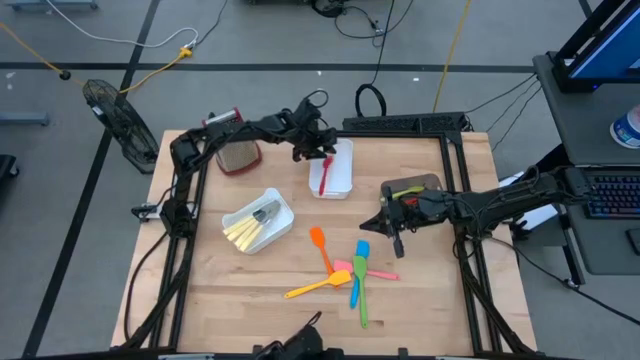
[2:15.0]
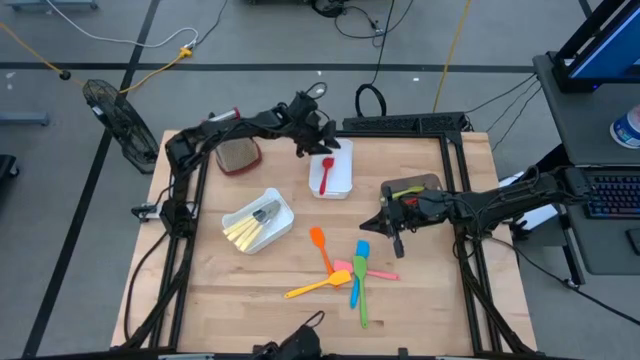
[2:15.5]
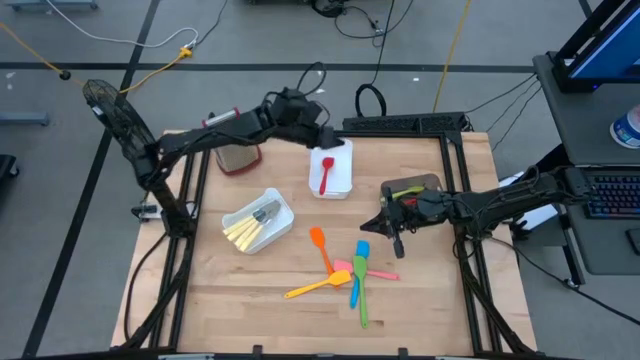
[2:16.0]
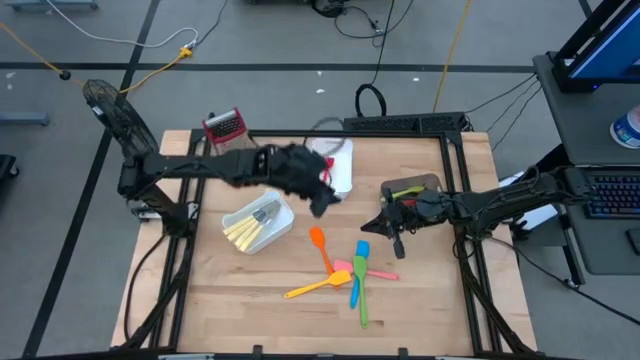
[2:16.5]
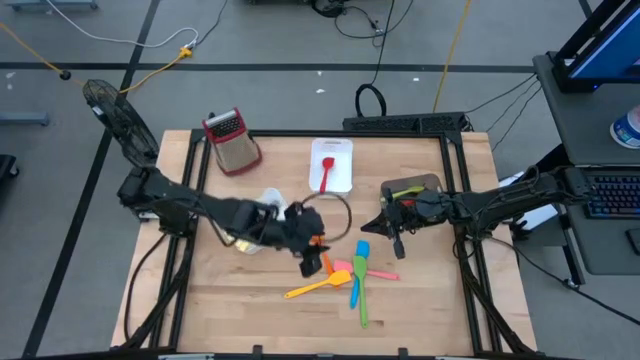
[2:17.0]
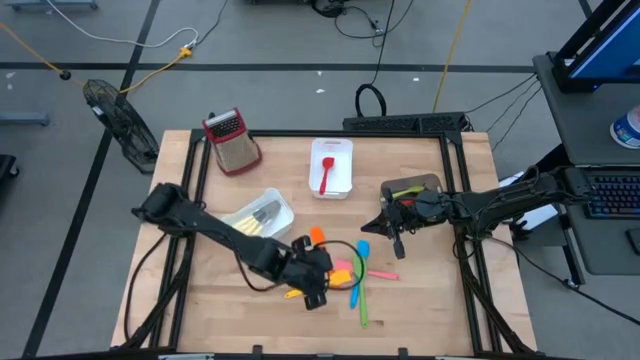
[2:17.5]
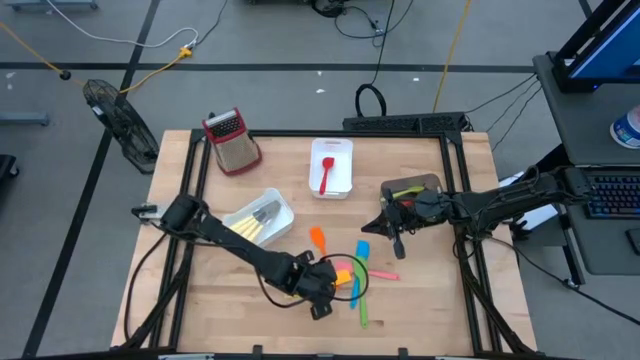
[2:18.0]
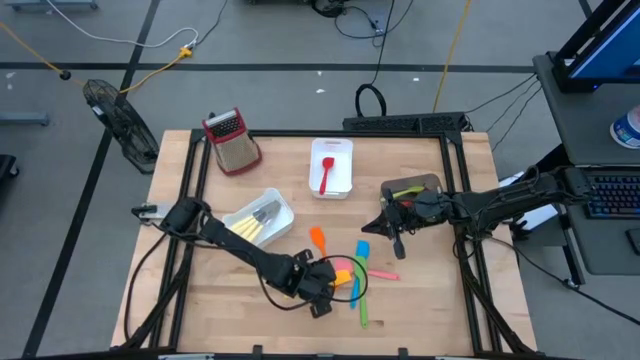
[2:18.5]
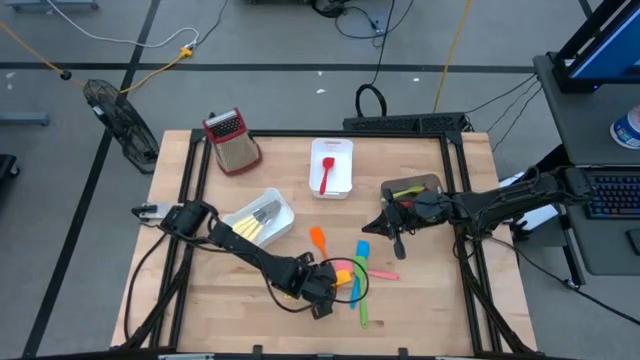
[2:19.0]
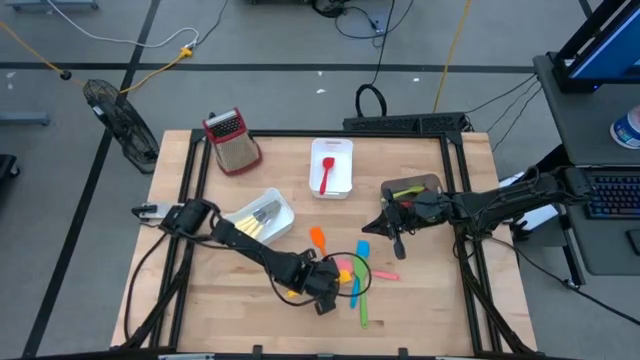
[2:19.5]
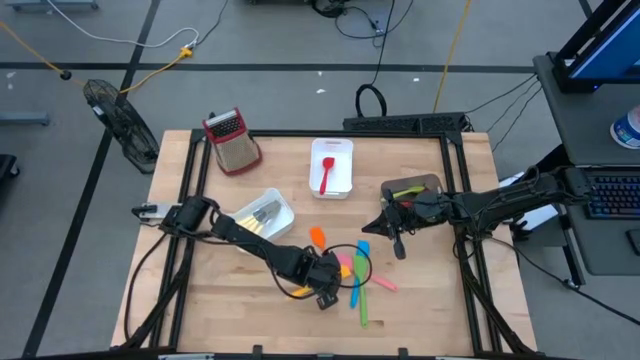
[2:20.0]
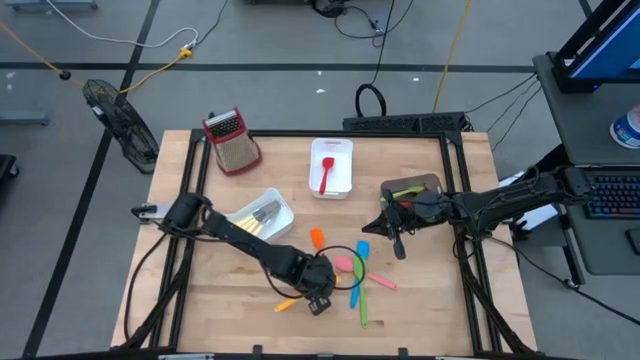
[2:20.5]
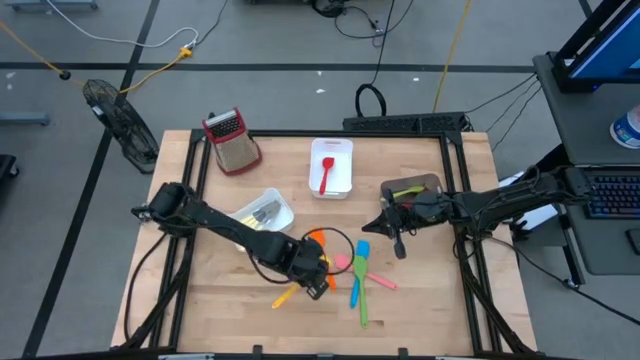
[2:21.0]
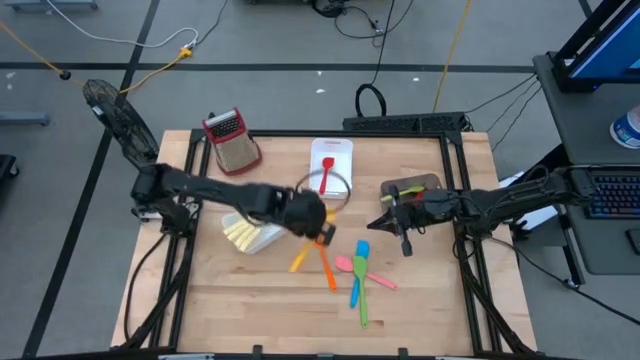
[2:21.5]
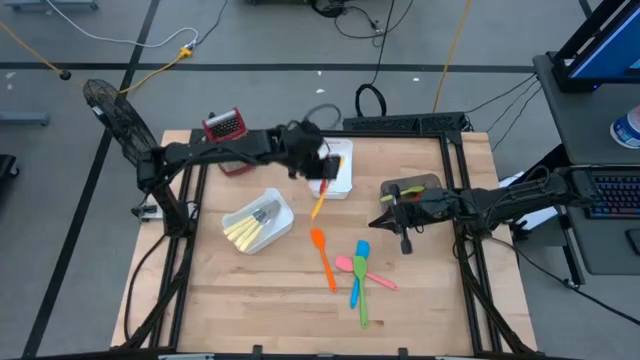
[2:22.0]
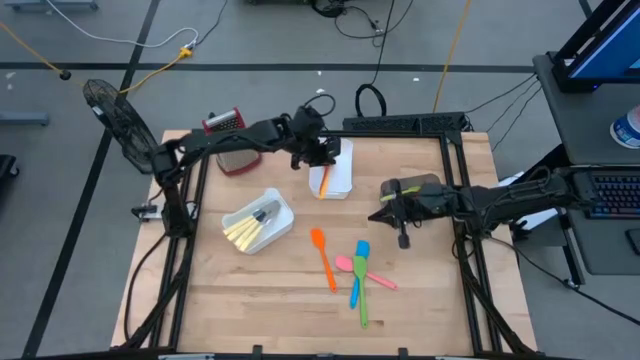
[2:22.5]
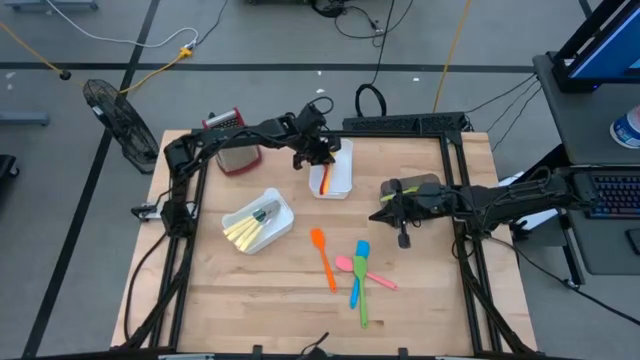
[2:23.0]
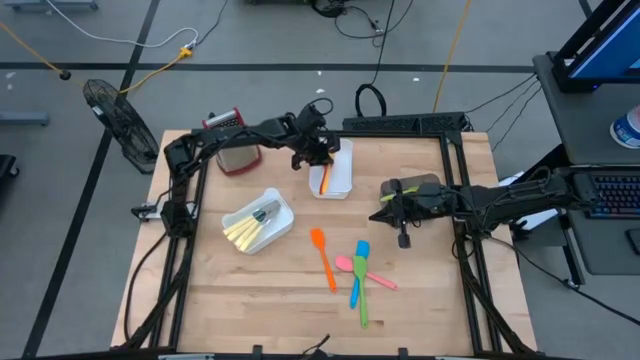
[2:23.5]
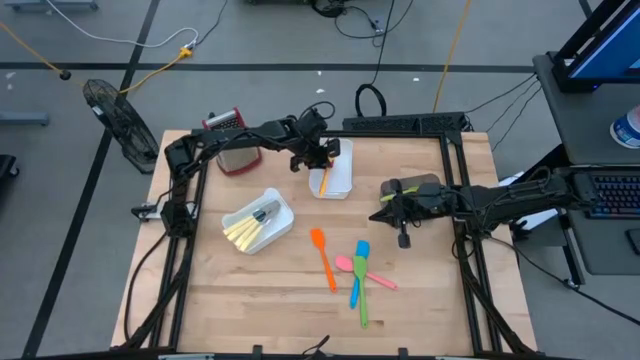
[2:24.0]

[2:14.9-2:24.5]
Task: Pick & Place Kitchen Items
Put the yellow spatula into the top white bin

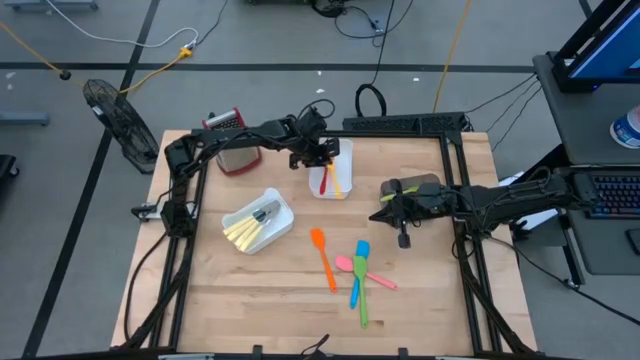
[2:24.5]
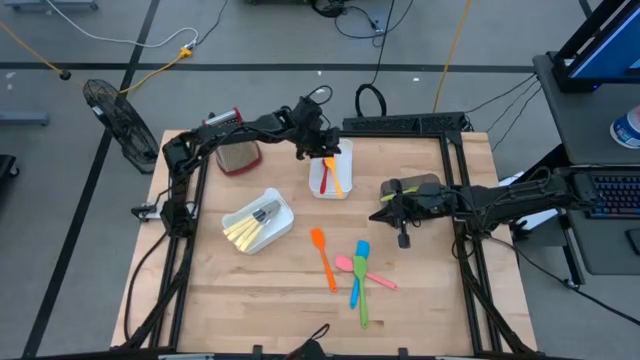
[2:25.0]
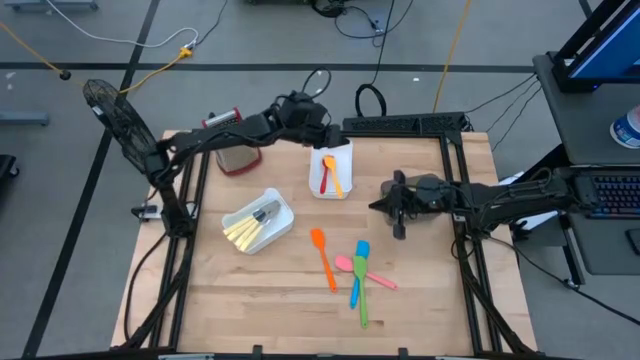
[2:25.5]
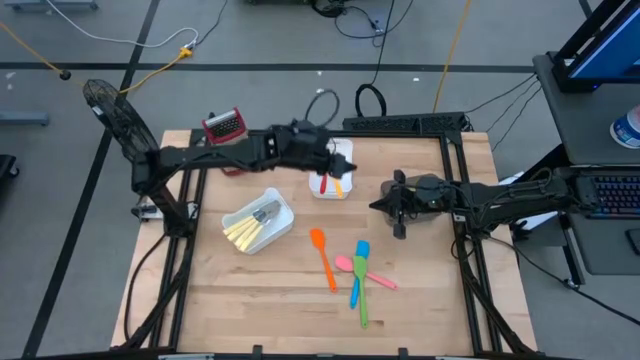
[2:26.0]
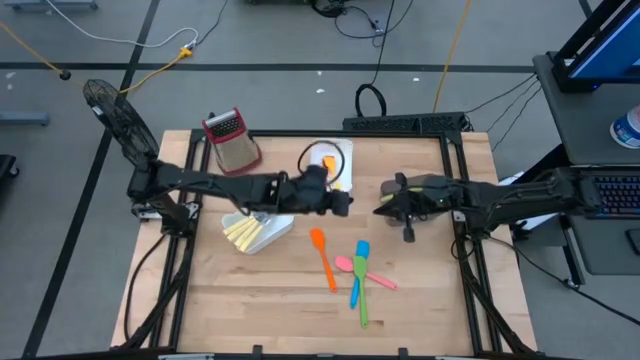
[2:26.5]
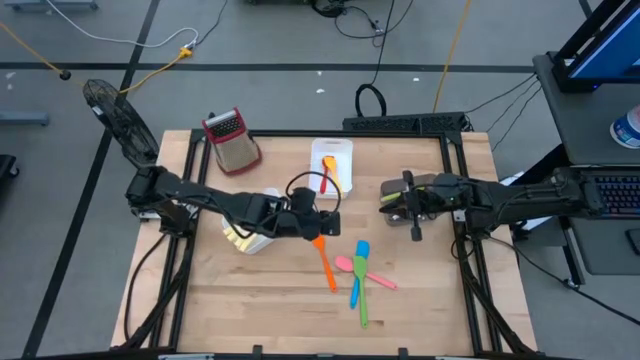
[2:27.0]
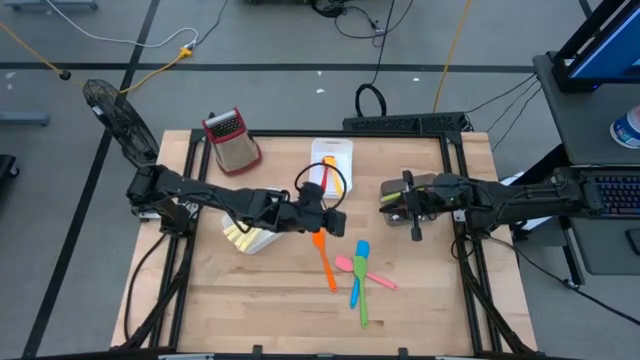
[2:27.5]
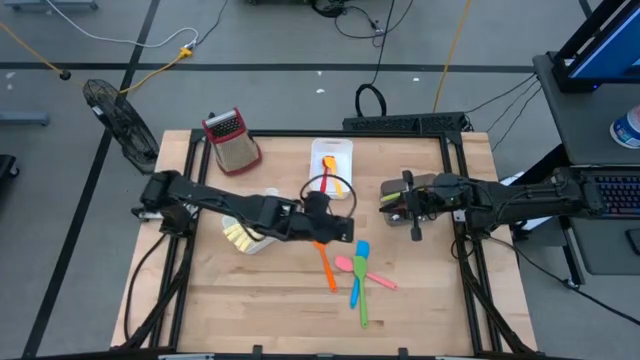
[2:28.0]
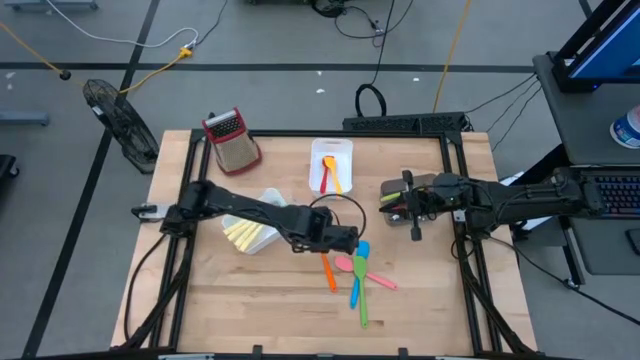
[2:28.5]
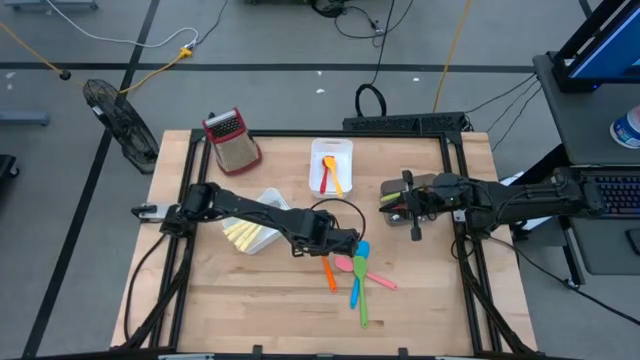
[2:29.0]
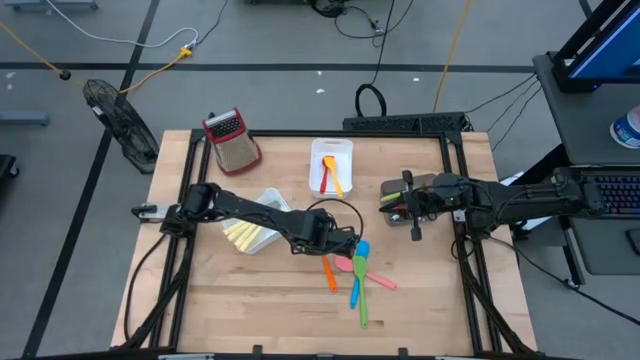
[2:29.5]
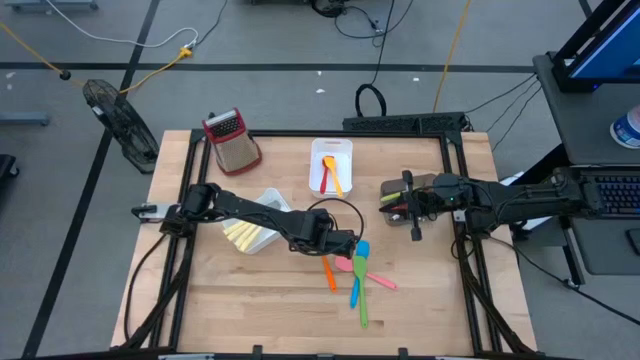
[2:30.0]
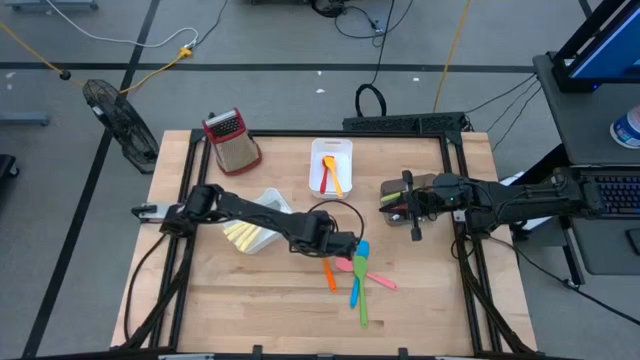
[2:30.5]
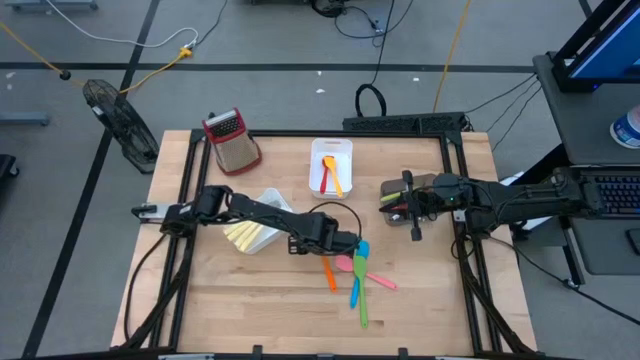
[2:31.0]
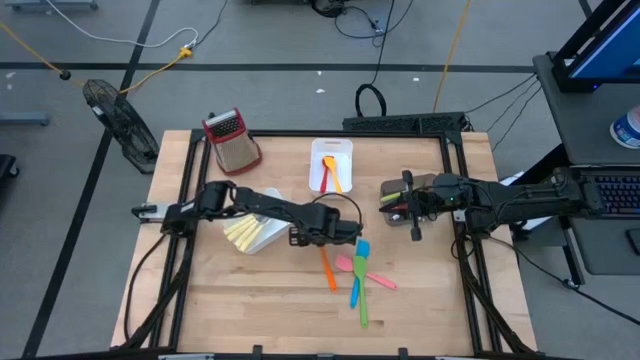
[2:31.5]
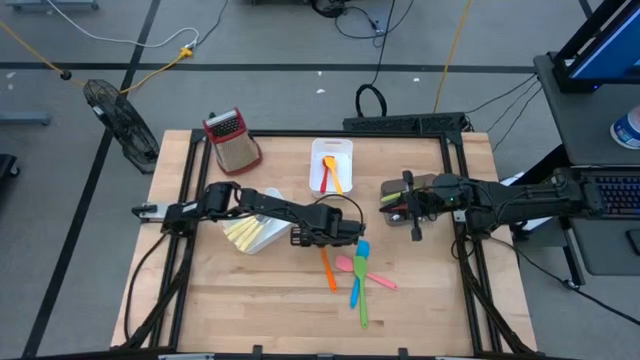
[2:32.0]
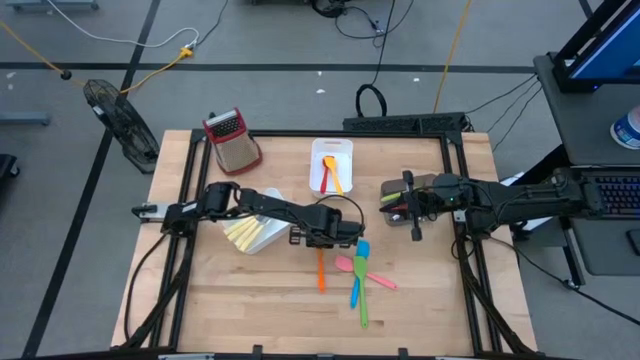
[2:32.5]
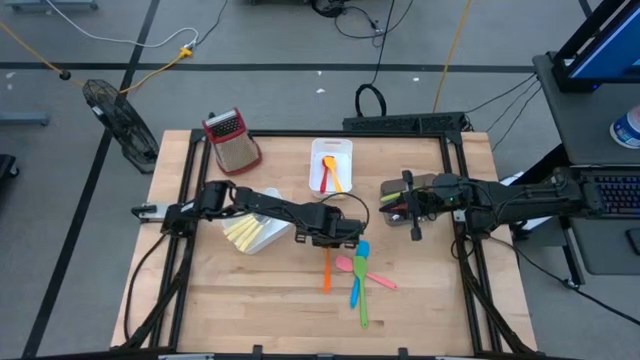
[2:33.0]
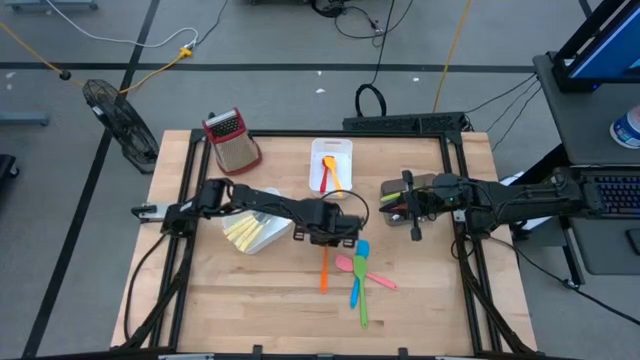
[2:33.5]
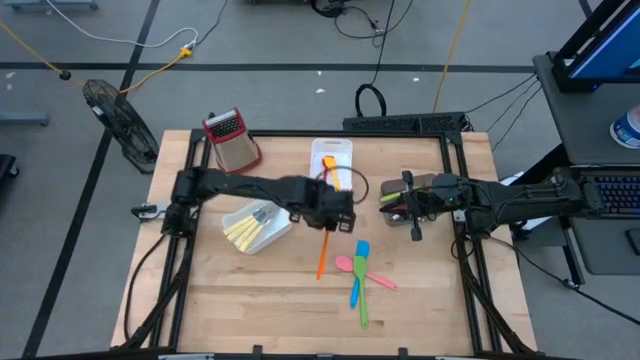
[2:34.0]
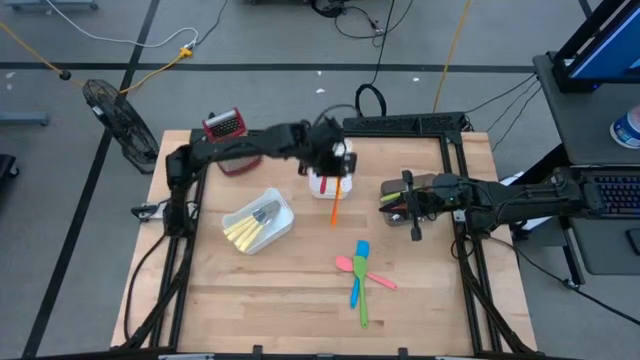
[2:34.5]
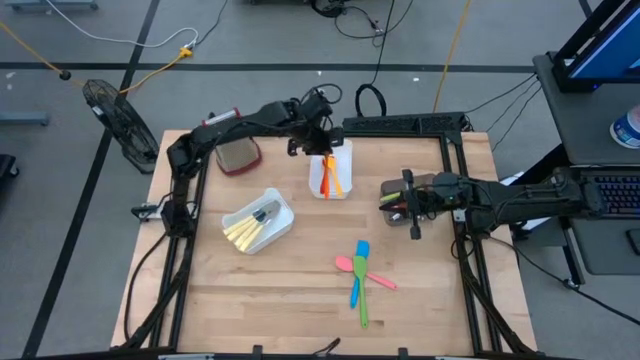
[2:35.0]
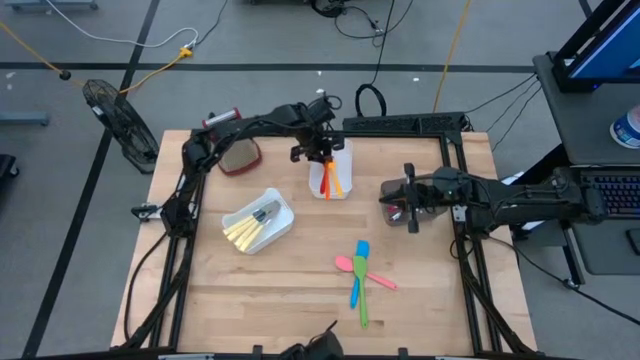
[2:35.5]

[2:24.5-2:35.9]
Put the orange spatula into the top white bin
